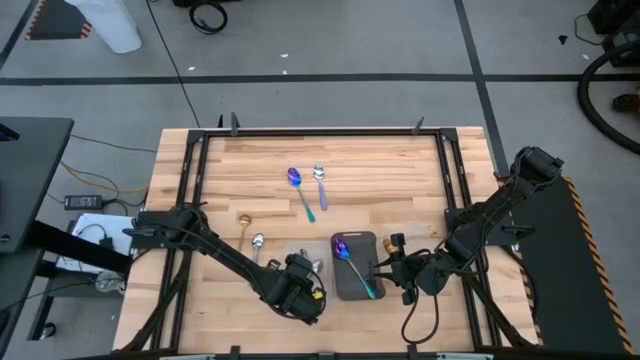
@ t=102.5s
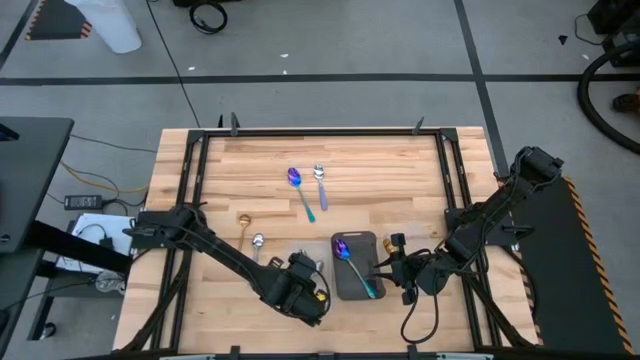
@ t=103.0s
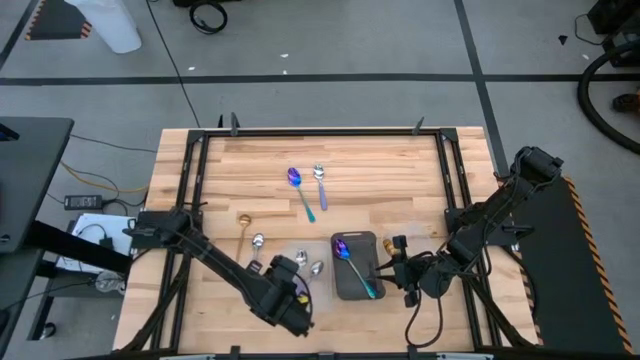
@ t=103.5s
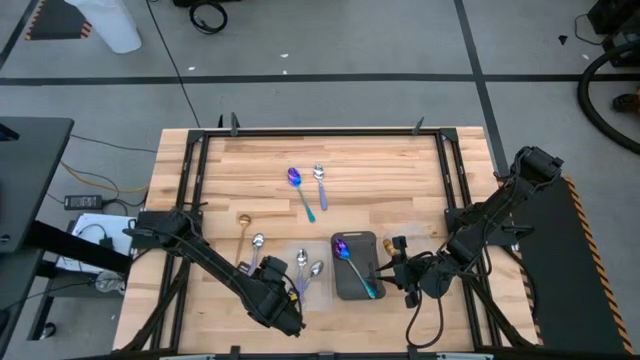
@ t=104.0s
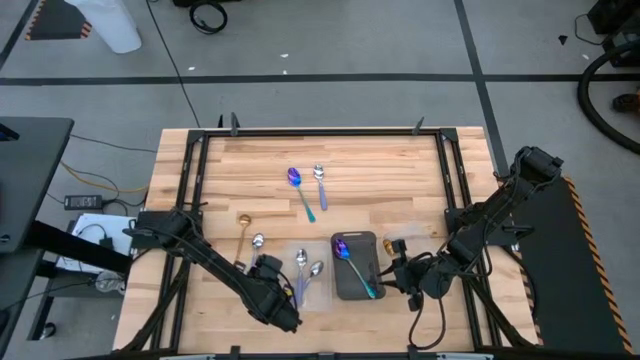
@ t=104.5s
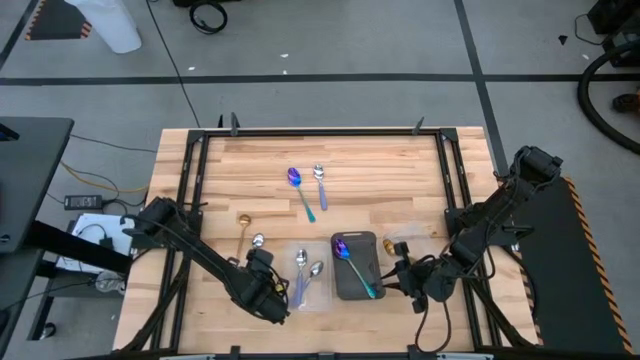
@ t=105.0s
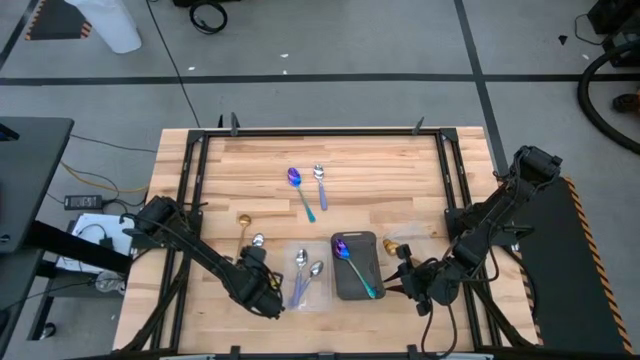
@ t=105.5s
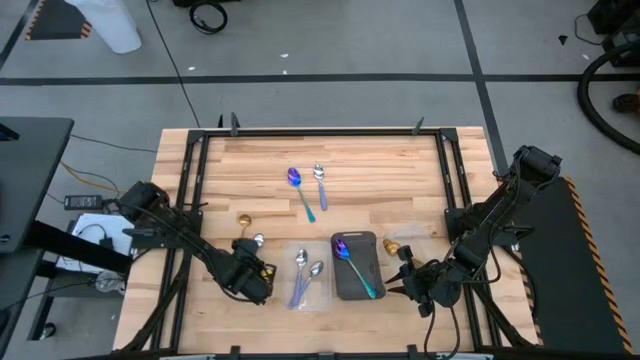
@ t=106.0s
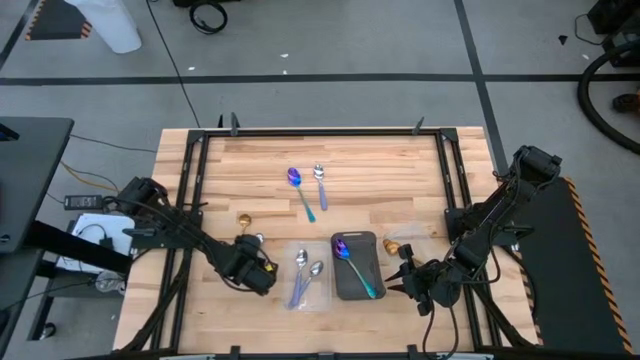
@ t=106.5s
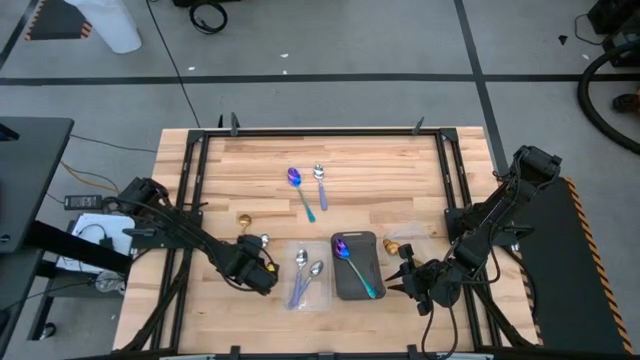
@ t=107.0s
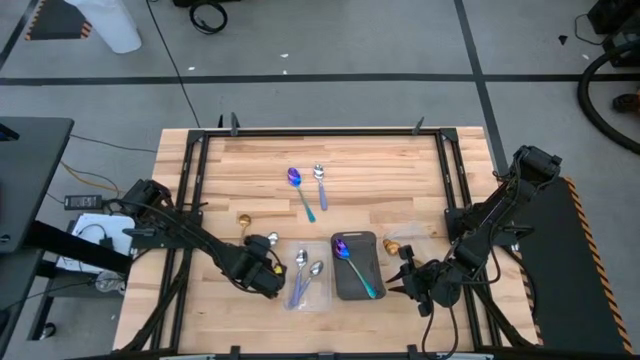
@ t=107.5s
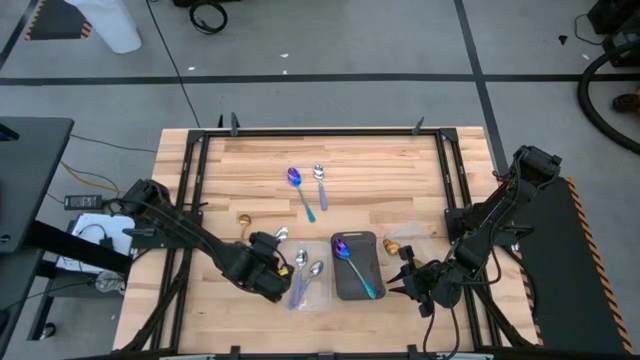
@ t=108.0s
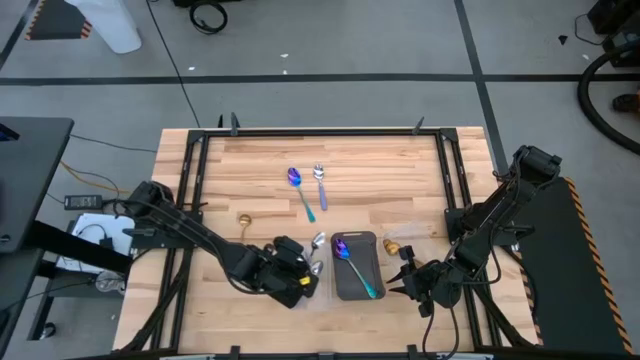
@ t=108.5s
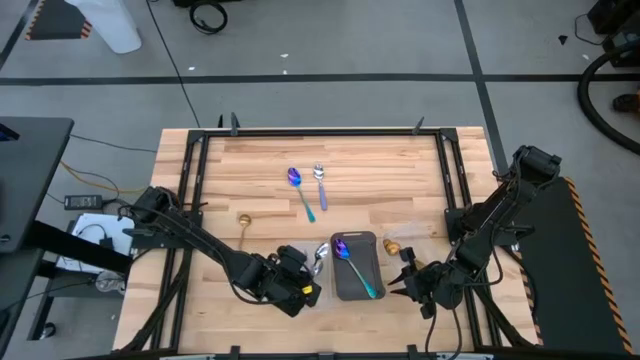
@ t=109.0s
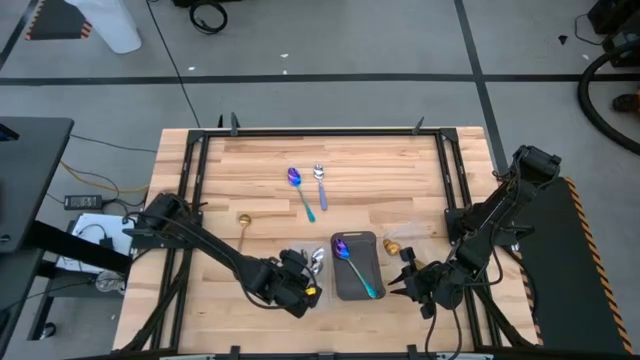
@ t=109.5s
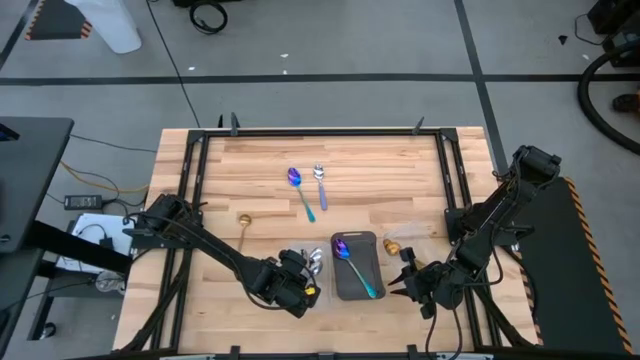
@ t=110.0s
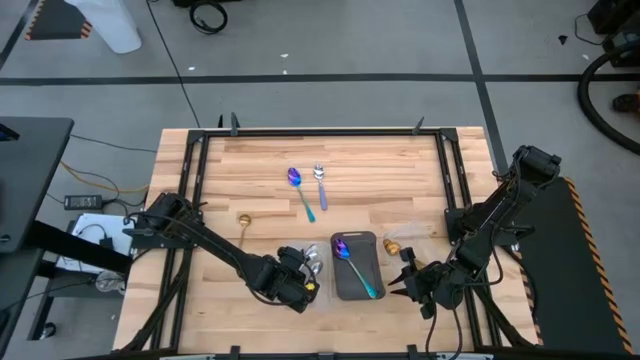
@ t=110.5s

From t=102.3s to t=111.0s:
Task: Sort silverware by color (type)
Put the purple spoon into the left transparent bin

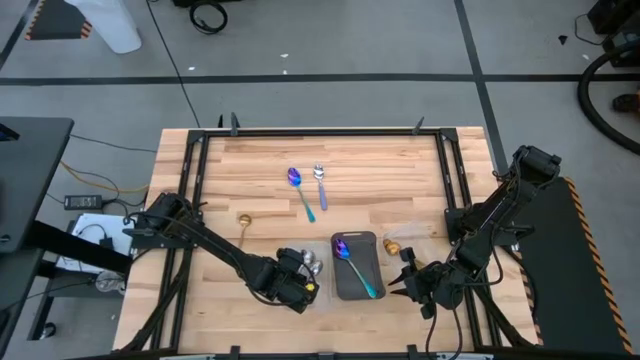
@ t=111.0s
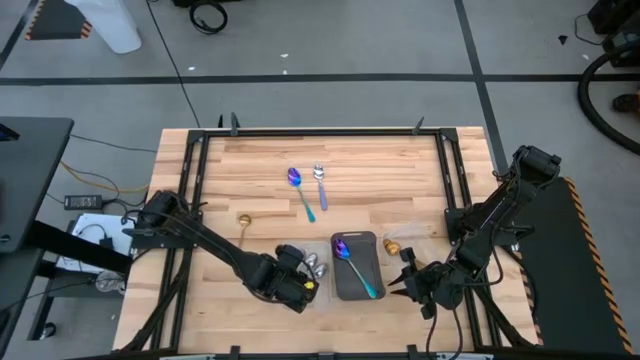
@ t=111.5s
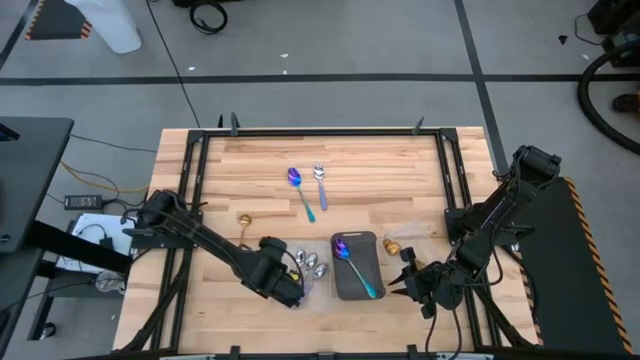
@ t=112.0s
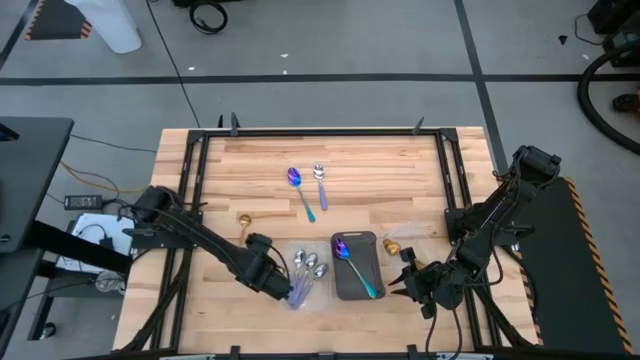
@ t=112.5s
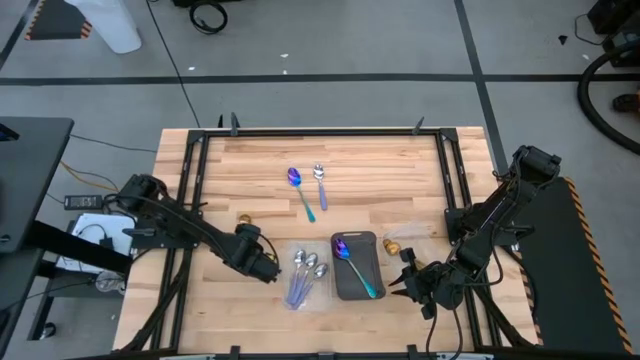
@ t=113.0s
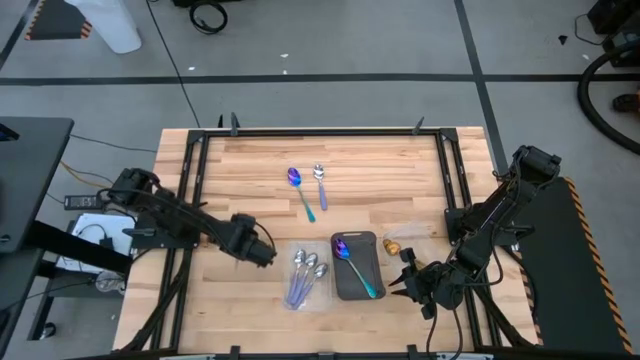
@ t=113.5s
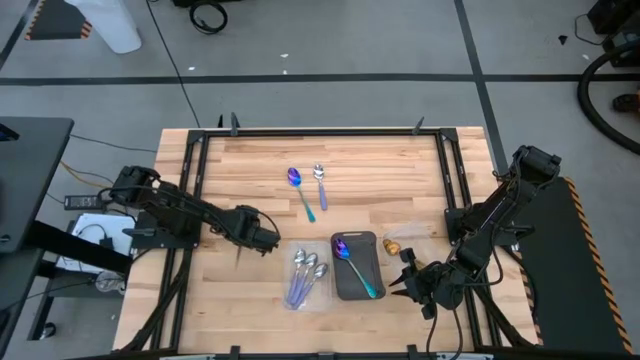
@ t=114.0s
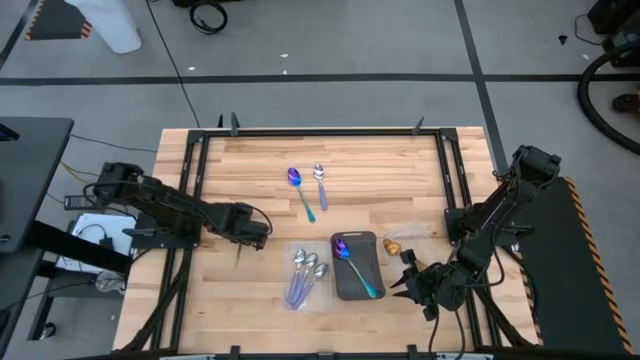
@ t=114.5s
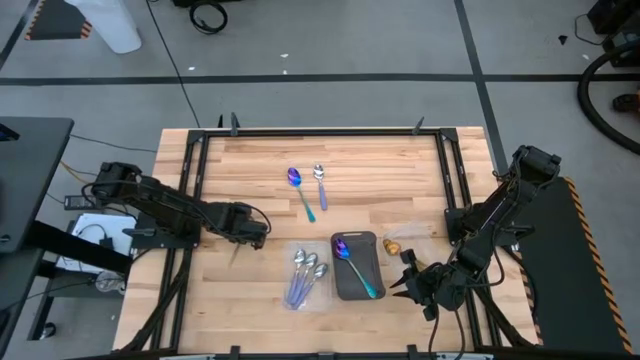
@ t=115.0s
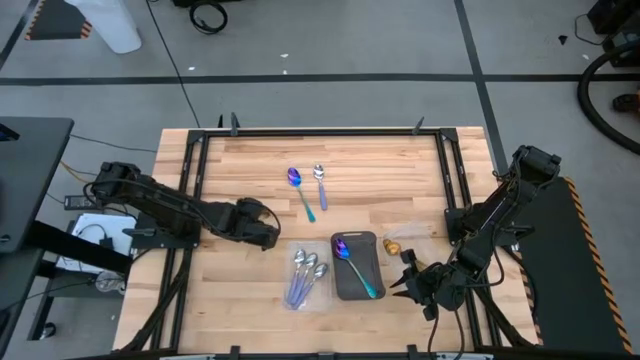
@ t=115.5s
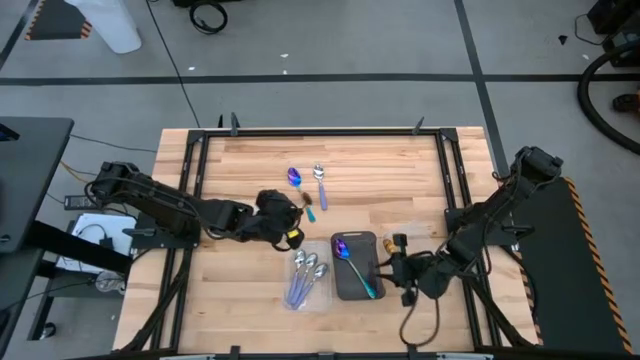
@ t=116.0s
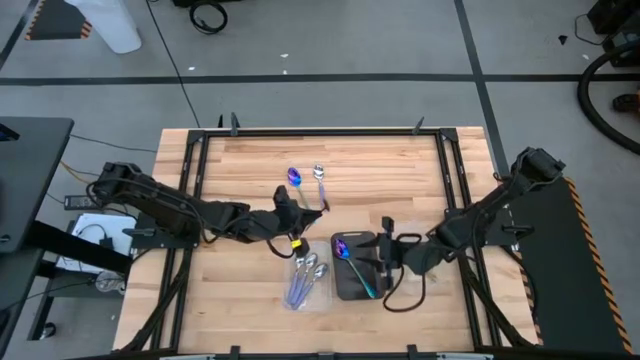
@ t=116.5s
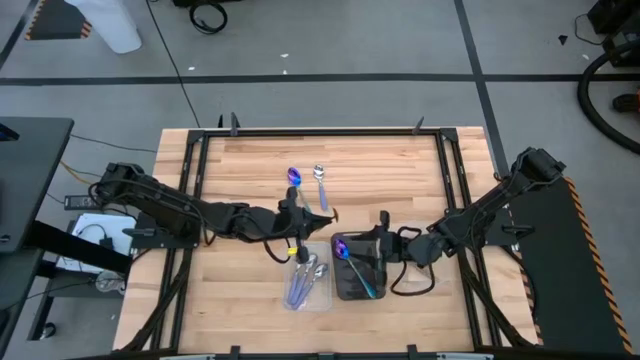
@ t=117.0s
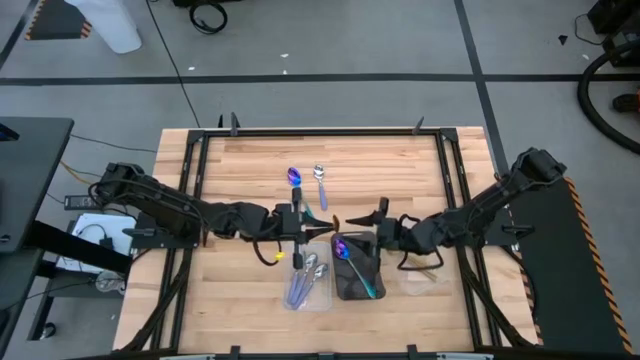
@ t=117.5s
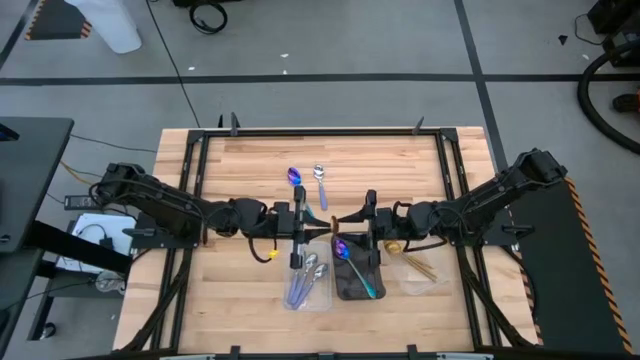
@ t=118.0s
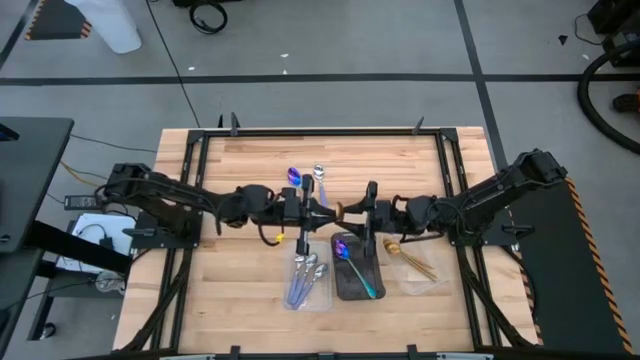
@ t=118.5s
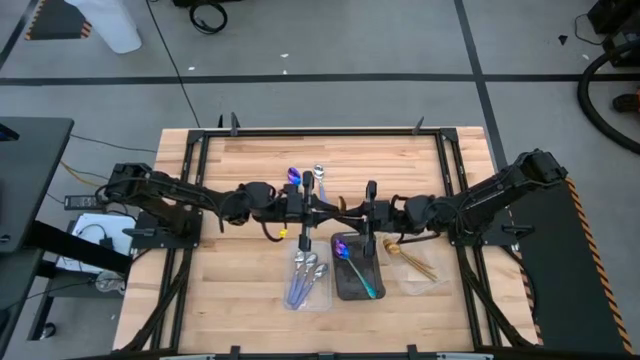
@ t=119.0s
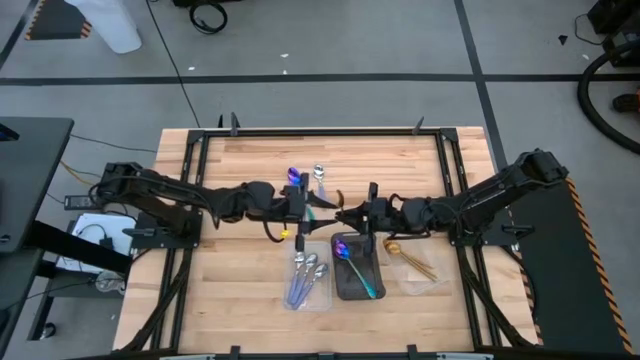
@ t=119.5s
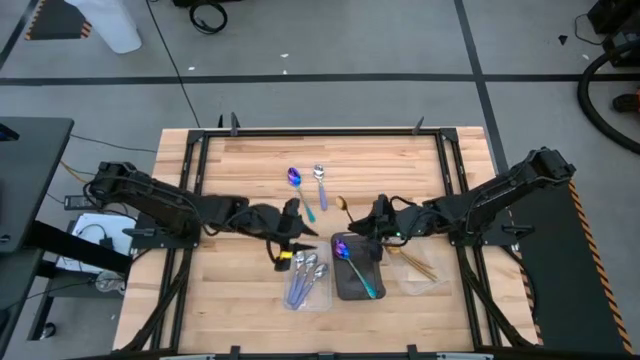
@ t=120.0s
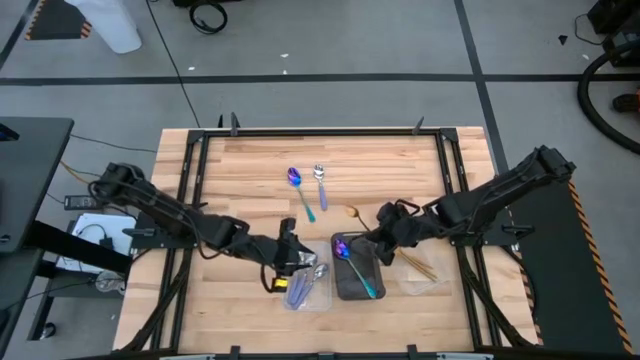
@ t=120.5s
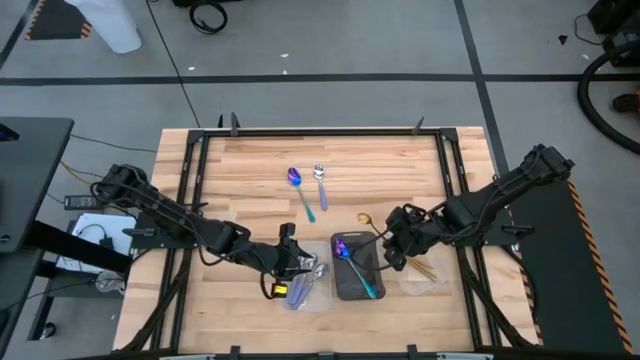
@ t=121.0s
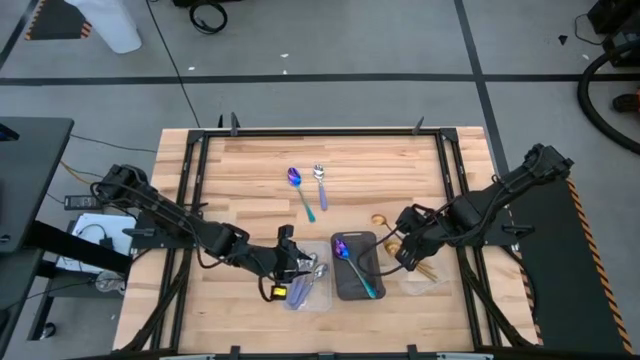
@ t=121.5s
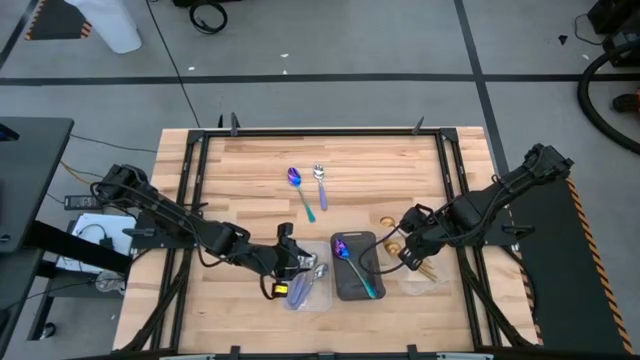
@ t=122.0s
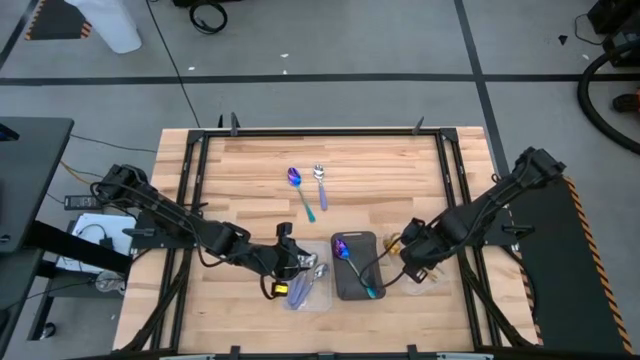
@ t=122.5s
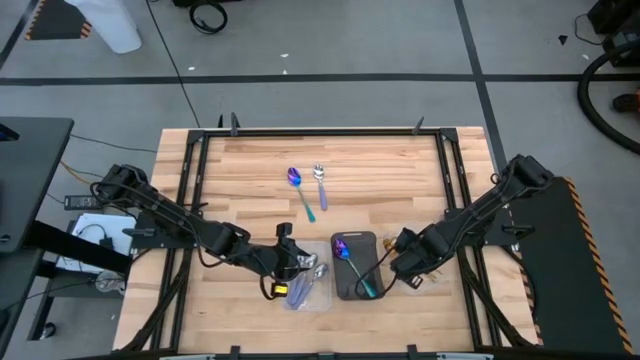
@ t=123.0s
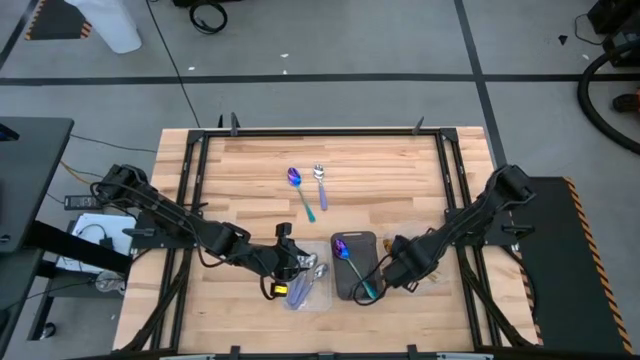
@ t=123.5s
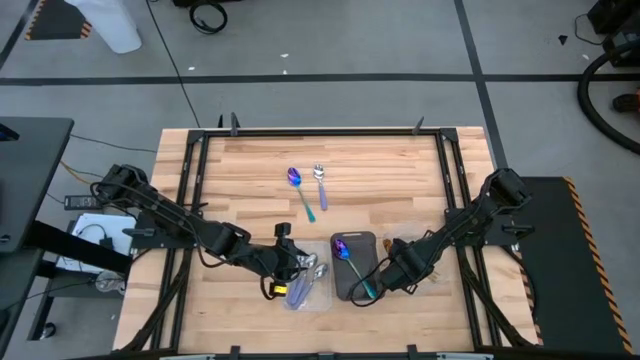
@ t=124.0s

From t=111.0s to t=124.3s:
Put the gold spoon into the right transparent bin
